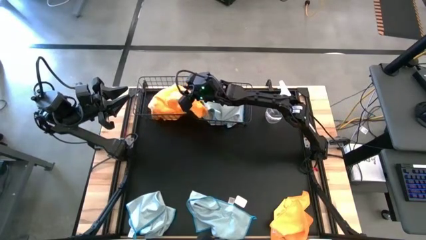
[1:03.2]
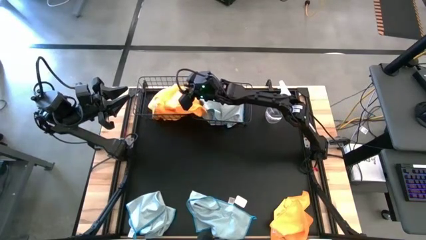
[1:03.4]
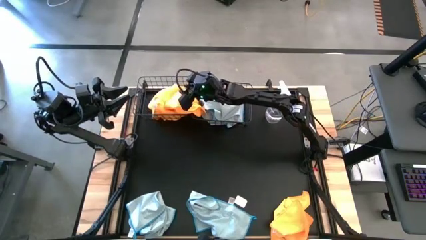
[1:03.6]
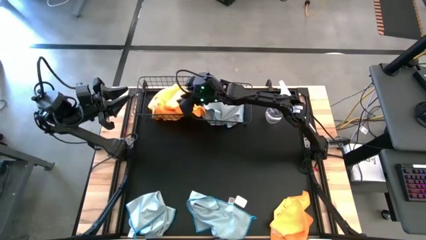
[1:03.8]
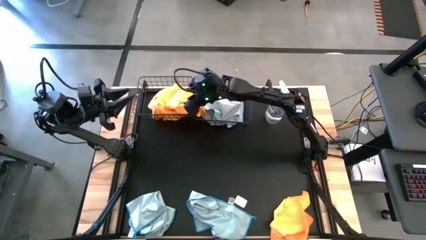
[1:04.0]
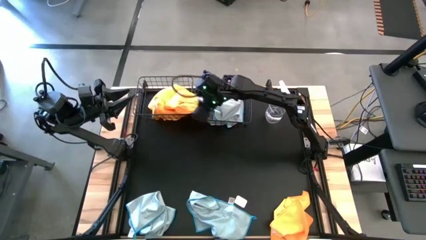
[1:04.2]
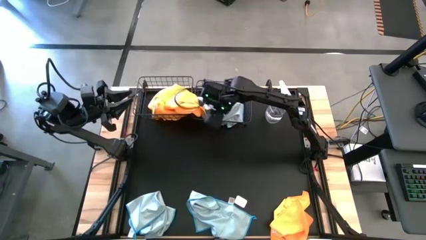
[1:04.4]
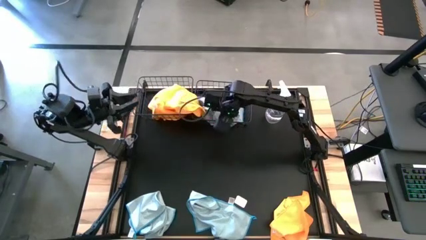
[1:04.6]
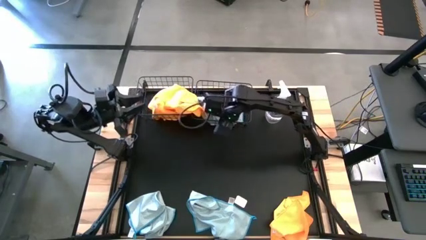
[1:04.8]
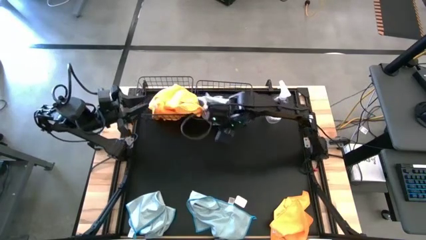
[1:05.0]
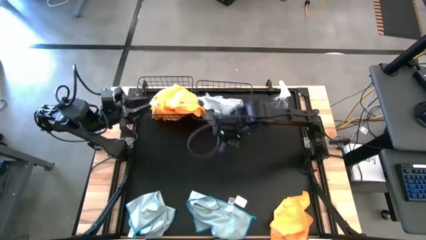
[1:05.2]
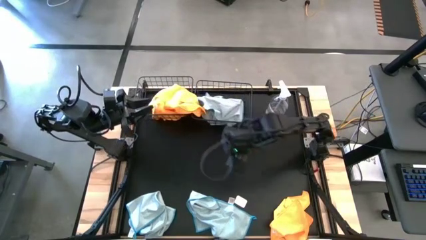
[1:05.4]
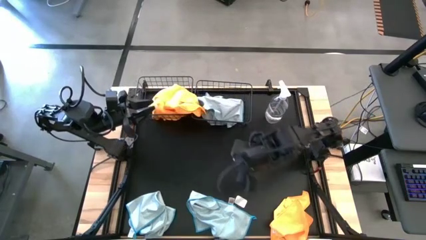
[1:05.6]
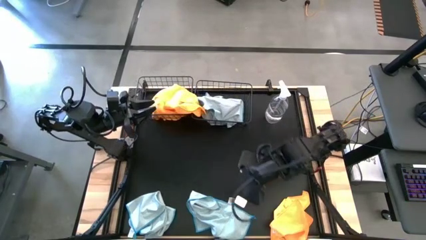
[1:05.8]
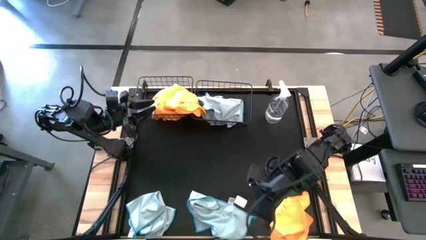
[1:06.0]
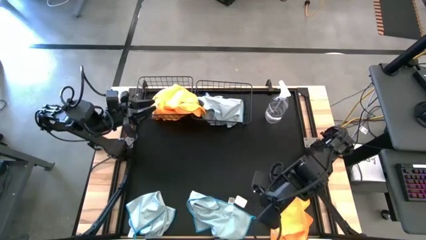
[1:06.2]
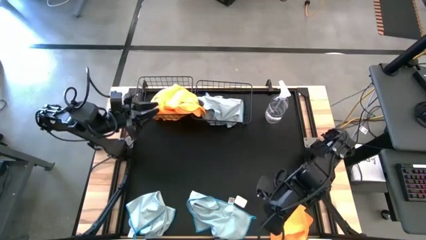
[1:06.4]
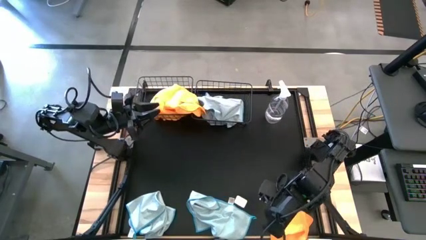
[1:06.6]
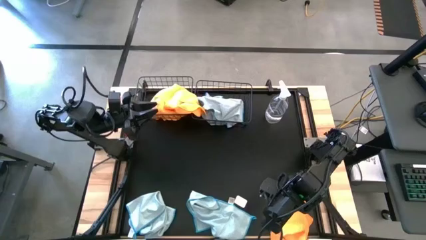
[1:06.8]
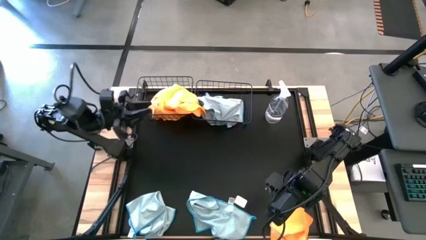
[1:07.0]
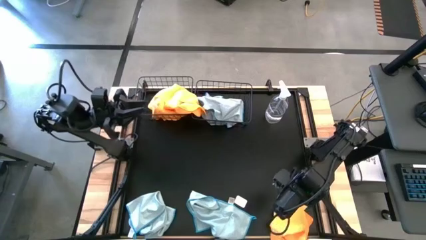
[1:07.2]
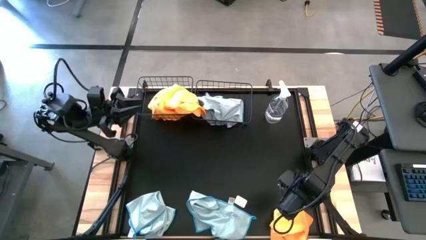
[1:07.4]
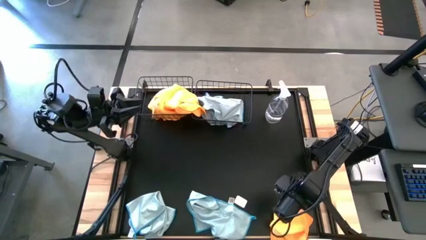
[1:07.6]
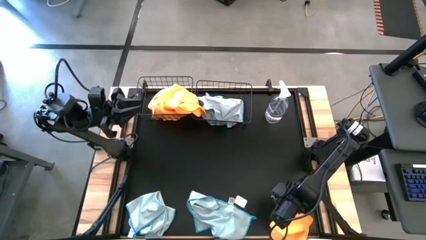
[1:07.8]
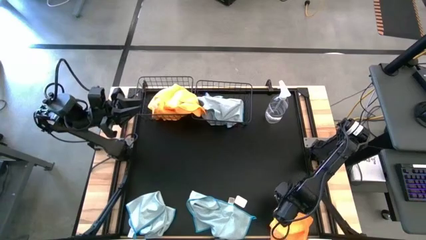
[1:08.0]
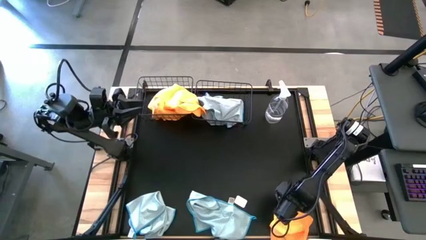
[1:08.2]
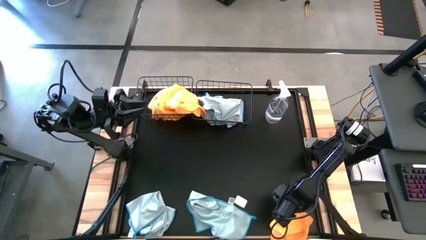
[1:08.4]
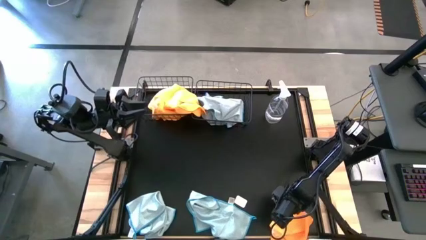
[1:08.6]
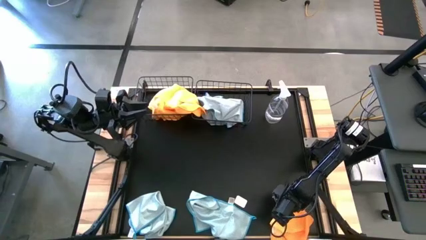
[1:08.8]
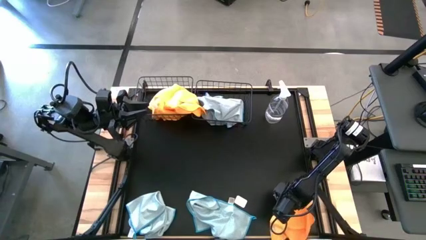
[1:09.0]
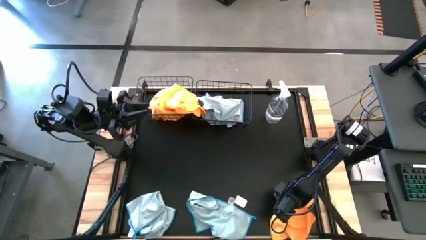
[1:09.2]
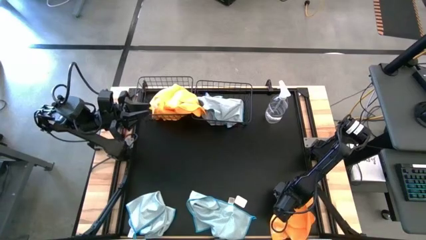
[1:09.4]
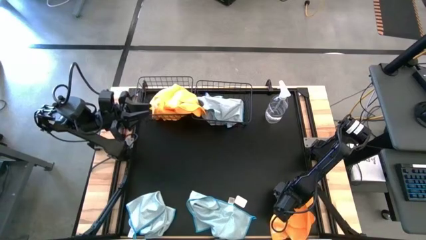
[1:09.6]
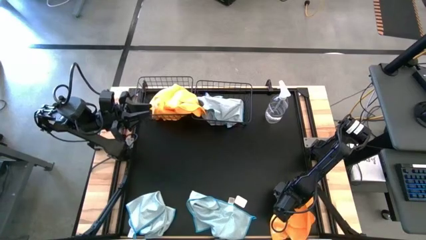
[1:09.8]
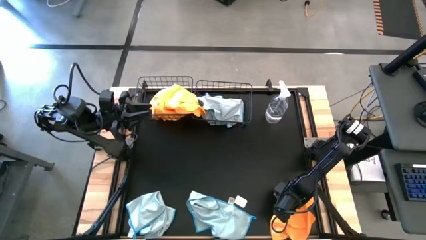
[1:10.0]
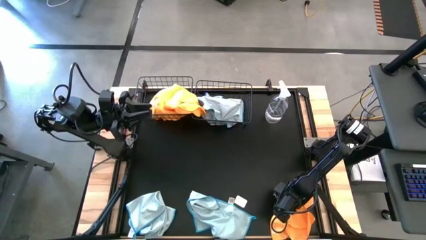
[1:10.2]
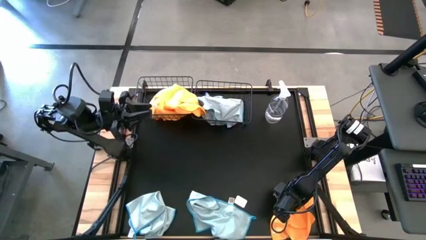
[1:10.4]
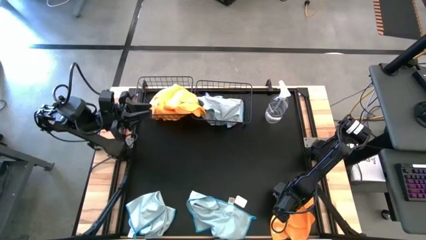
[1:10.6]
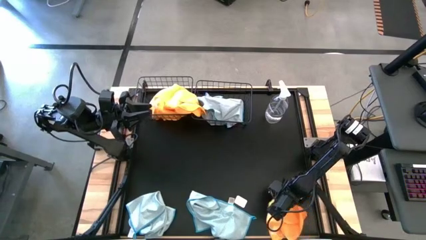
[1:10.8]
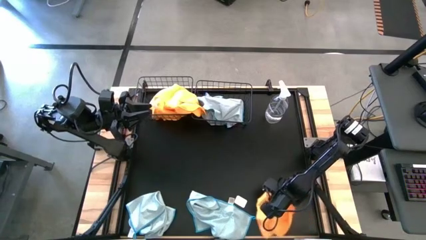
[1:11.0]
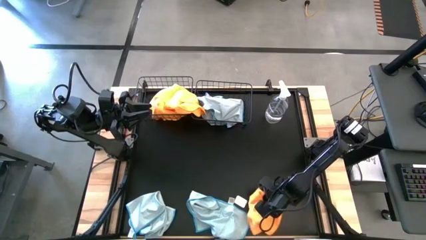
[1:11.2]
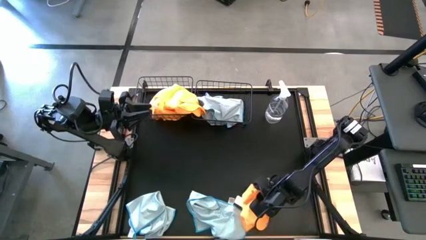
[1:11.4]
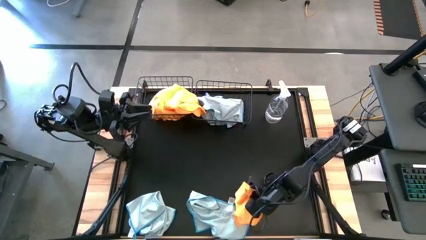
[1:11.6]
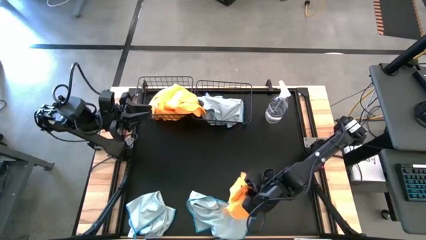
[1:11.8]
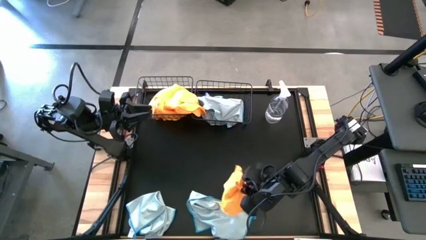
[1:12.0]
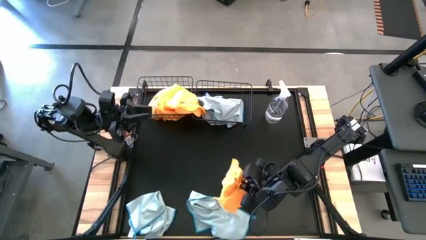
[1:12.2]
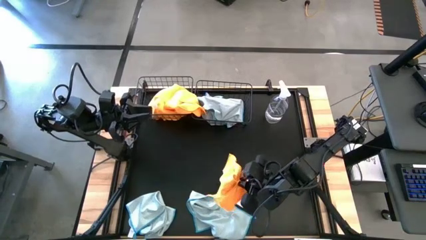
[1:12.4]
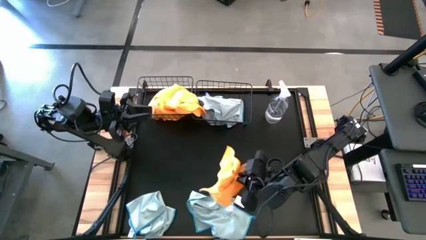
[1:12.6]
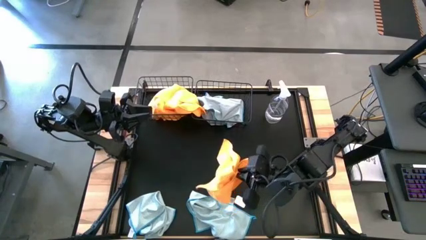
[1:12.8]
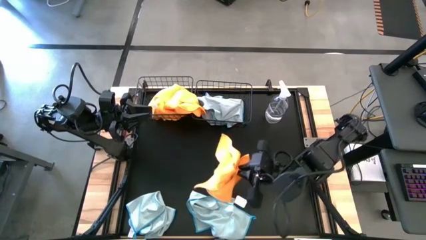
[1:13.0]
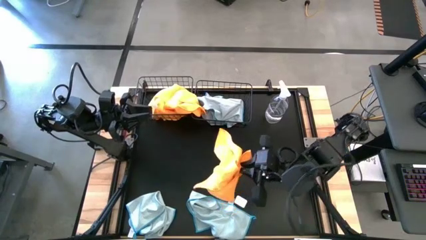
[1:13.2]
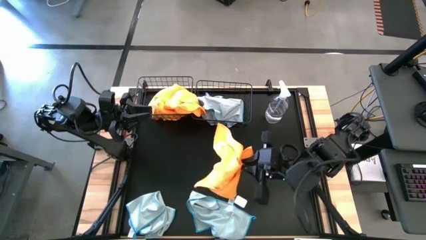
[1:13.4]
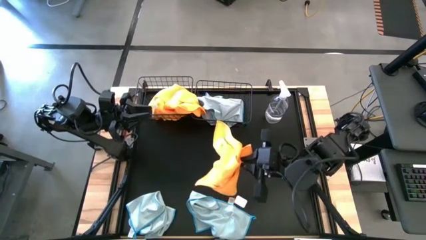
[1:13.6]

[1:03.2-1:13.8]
Task: Sort microfiber towel by color & place in baskets
Put the yellow microfiber cloth into the left black wire basket

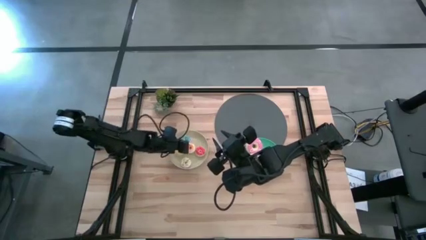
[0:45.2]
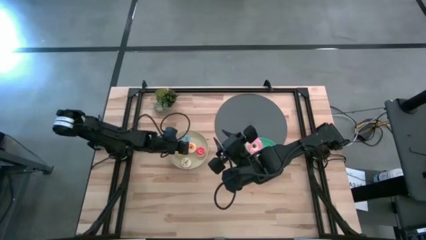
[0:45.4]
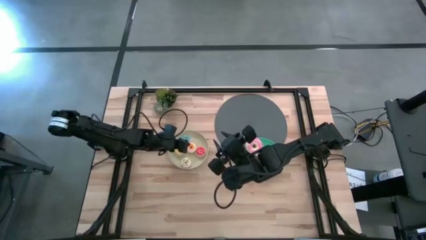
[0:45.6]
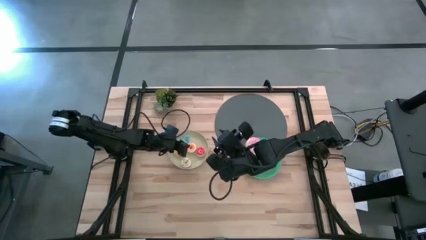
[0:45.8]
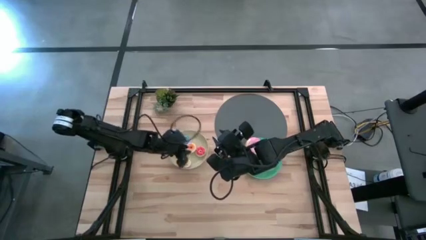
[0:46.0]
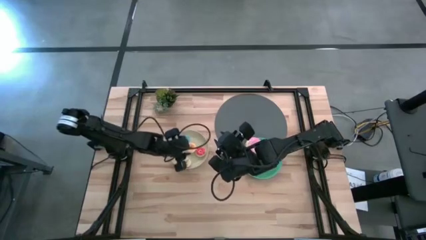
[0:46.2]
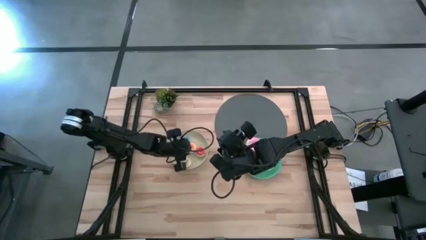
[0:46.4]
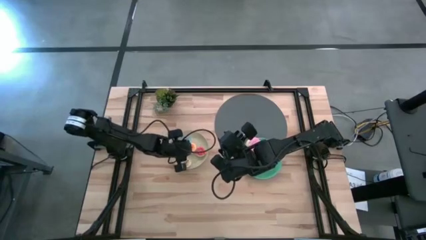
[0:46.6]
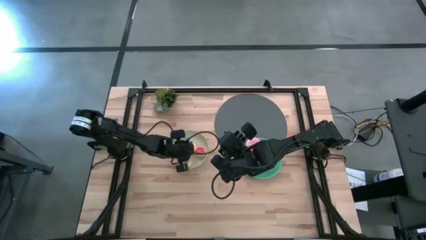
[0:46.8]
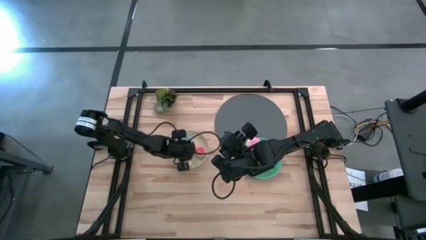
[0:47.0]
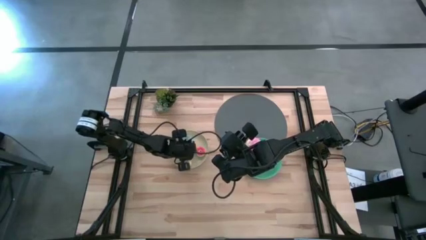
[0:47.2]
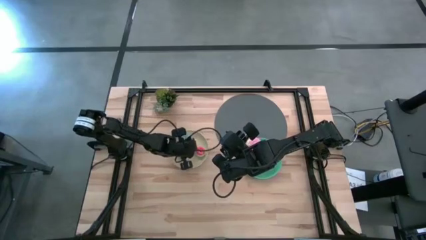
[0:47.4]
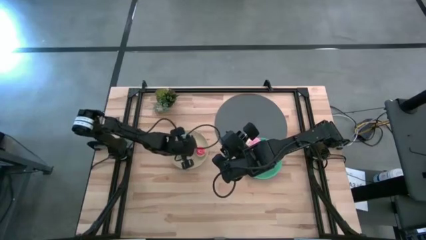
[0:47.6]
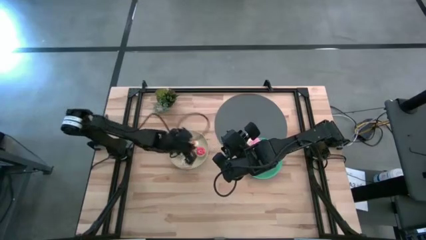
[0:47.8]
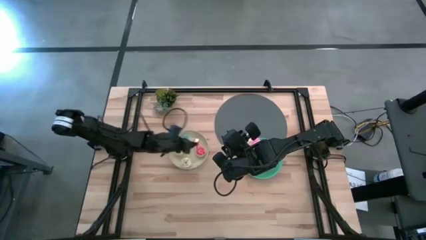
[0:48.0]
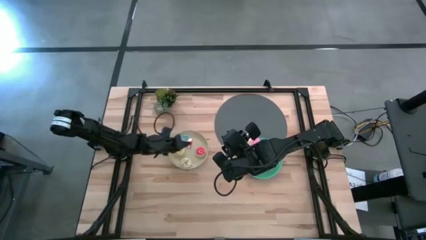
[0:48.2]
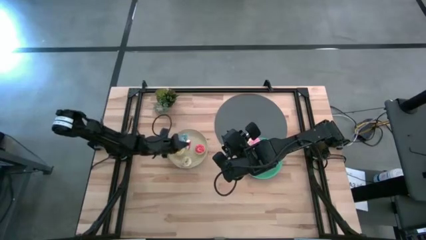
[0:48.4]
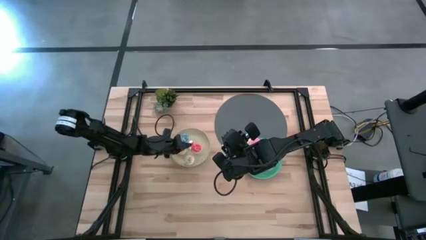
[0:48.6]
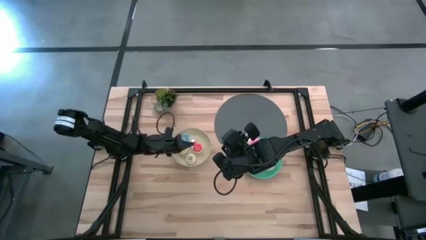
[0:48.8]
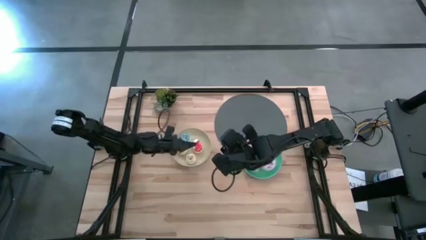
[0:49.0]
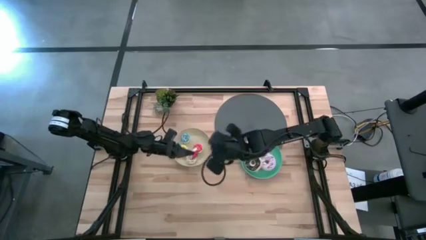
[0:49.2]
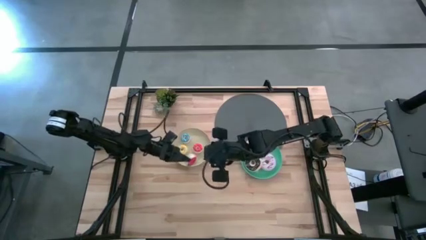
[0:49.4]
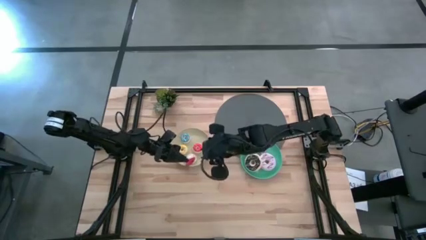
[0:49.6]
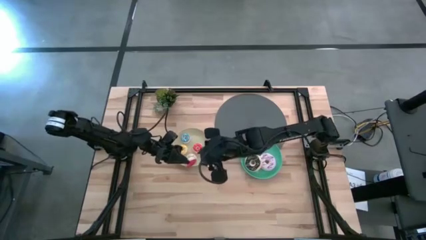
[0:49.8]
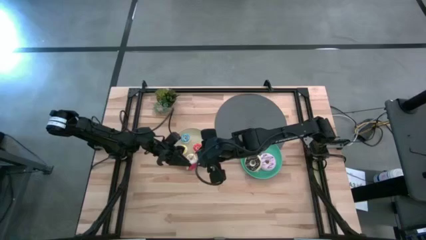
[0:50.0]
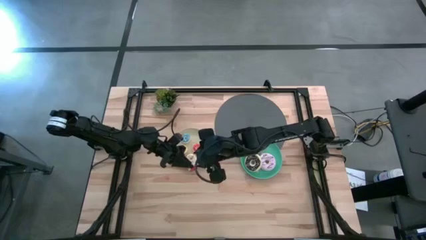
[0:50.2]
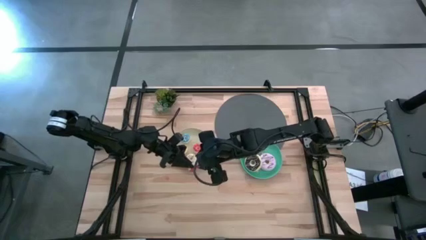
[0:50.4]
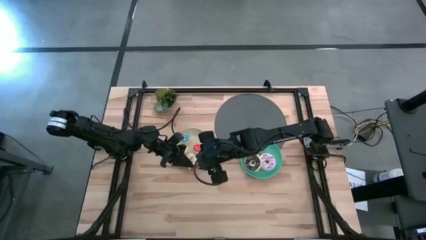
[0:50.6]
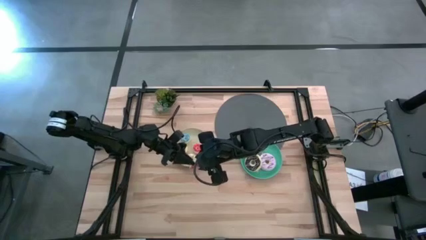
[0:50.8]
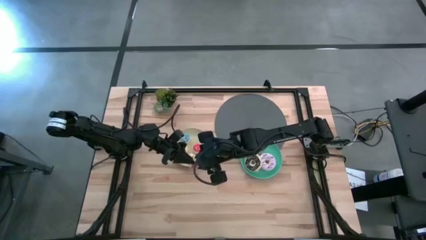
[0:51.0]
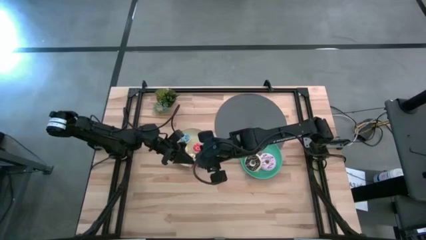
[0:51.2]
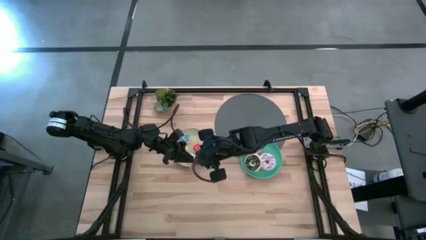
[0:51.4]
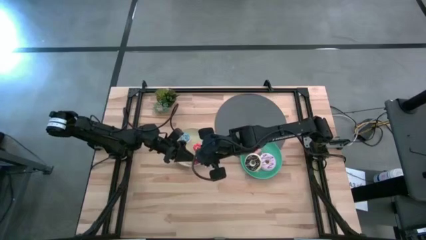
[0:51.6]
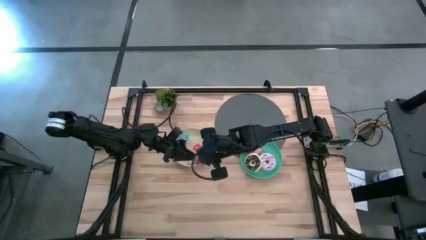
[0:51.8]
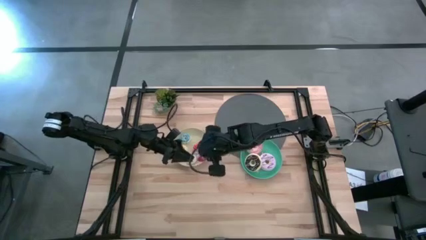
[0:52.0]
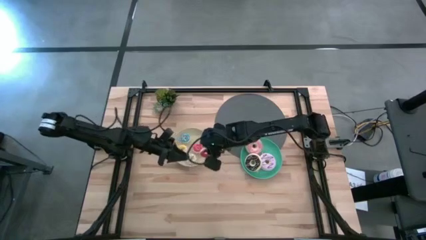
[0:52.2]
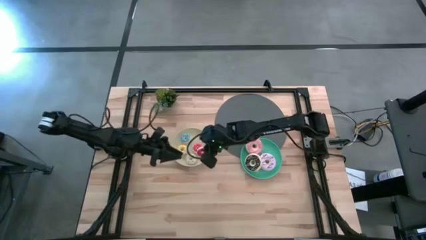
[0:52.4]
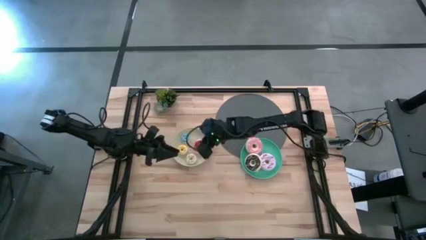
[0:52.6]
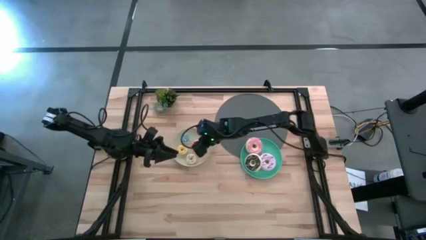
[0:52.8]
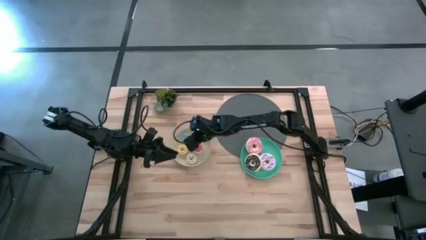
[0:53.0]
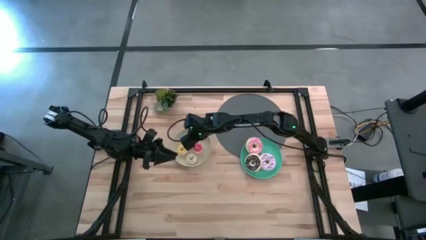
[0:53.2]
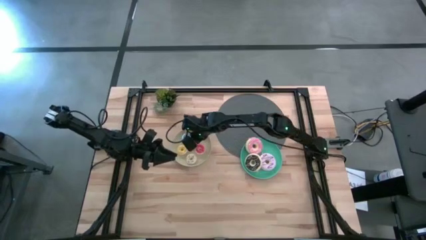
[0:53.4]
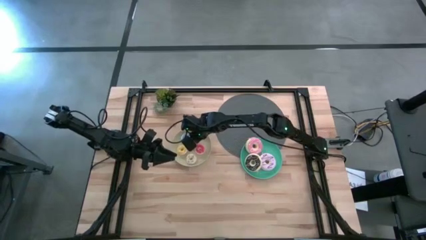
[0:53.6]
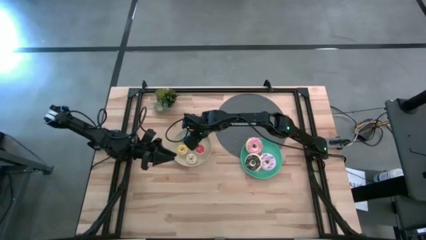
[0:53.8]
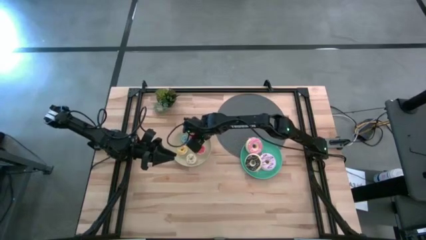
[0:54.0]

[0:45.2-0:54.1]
Task: Pick & Place donuts
Put the small red donut on the light brown plate
